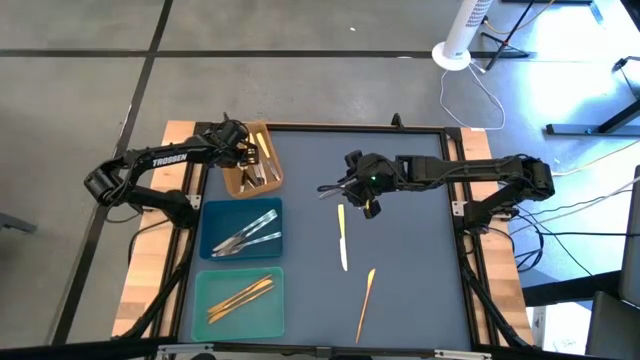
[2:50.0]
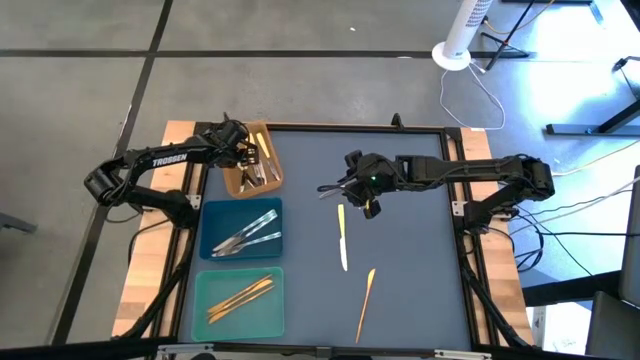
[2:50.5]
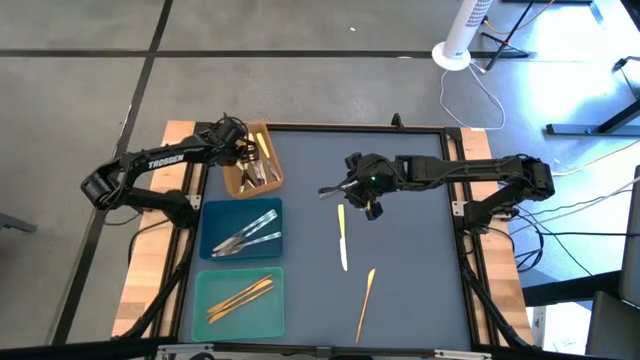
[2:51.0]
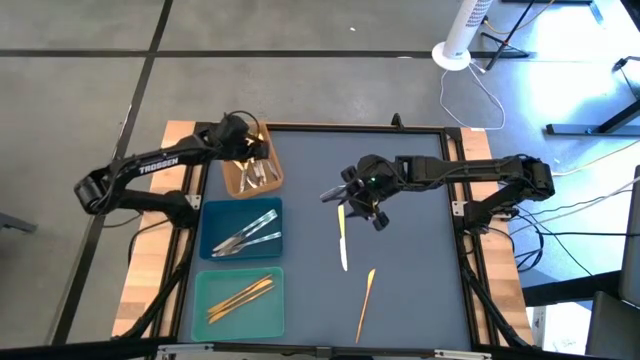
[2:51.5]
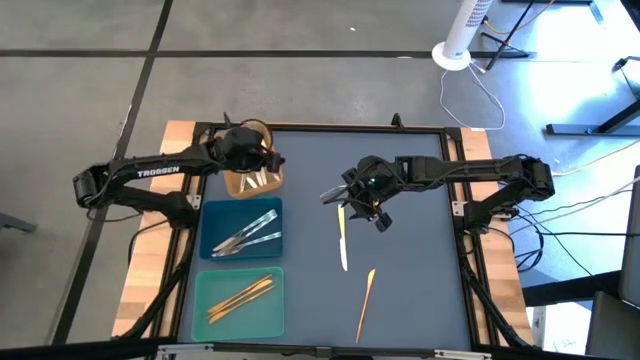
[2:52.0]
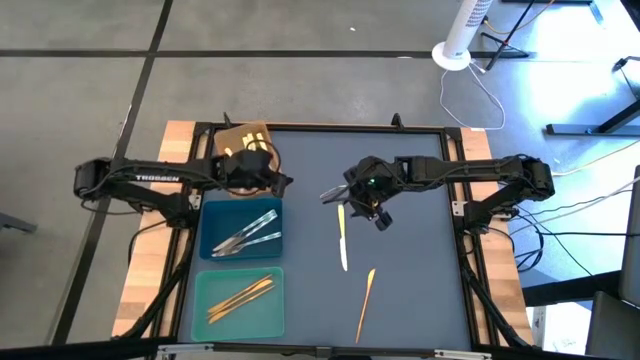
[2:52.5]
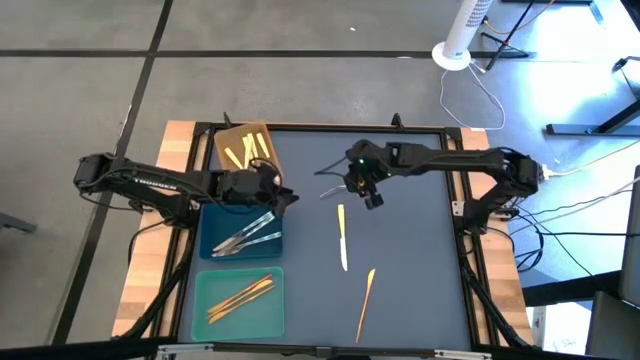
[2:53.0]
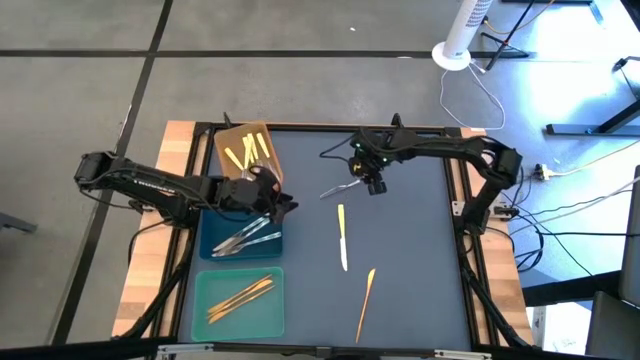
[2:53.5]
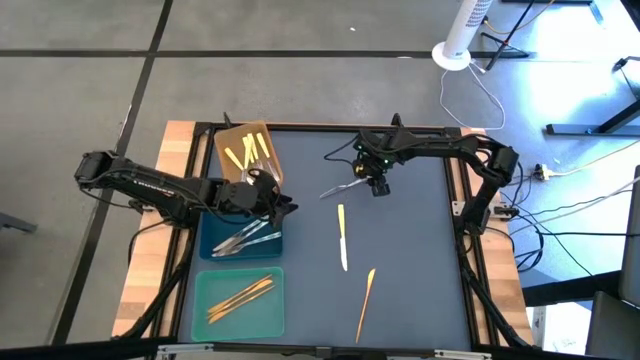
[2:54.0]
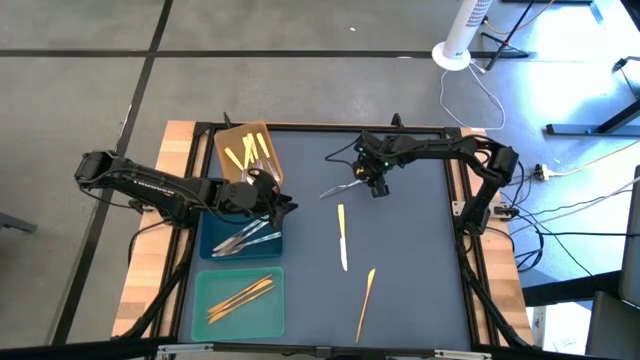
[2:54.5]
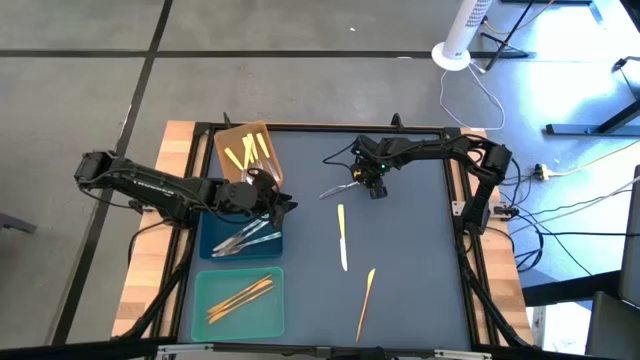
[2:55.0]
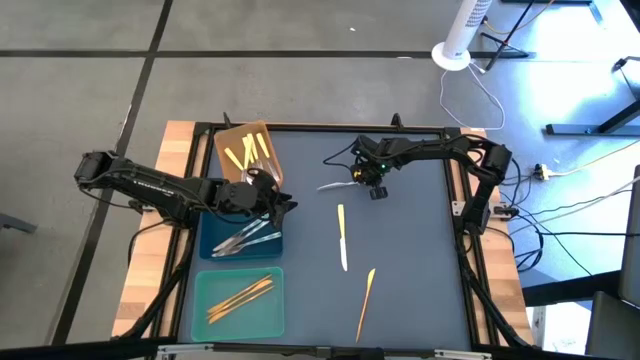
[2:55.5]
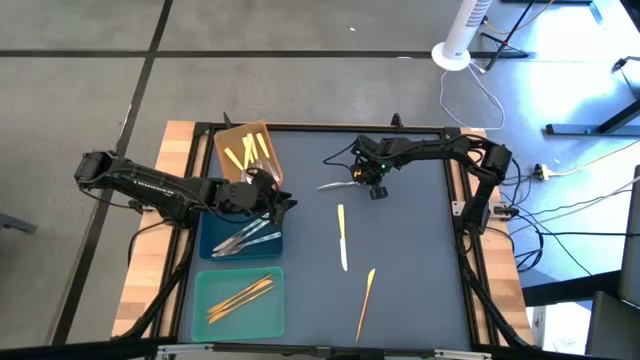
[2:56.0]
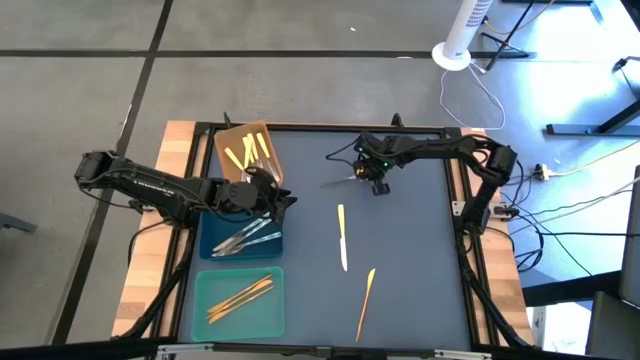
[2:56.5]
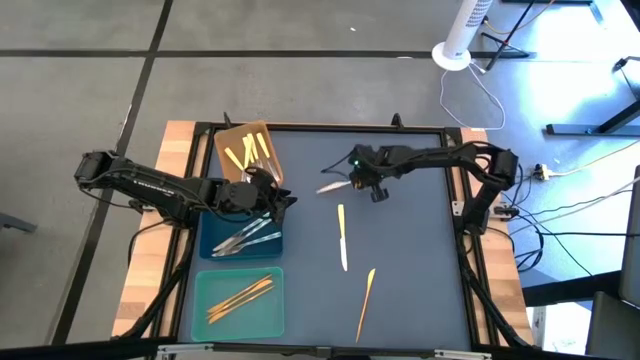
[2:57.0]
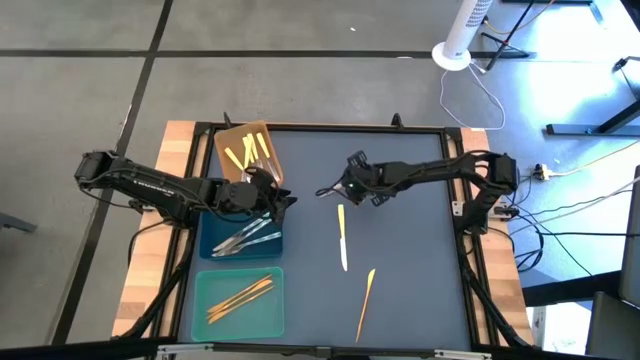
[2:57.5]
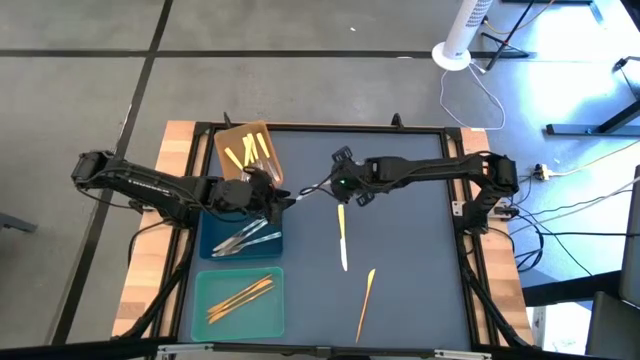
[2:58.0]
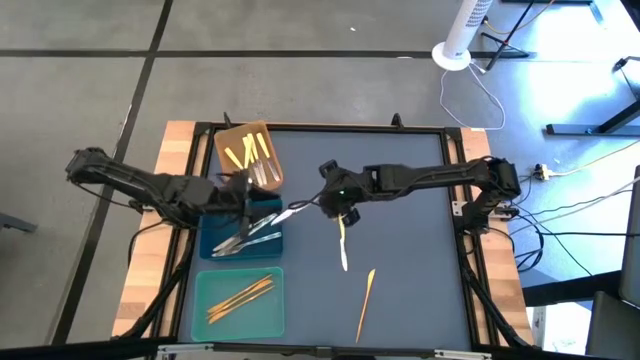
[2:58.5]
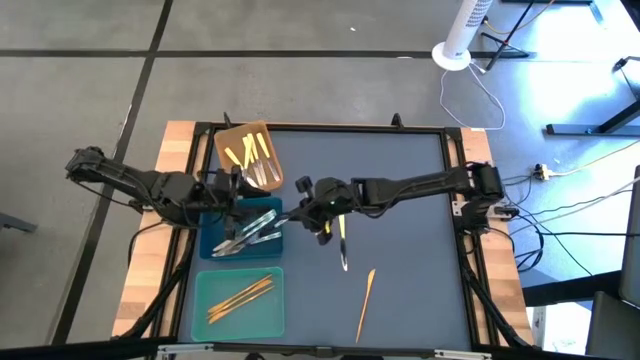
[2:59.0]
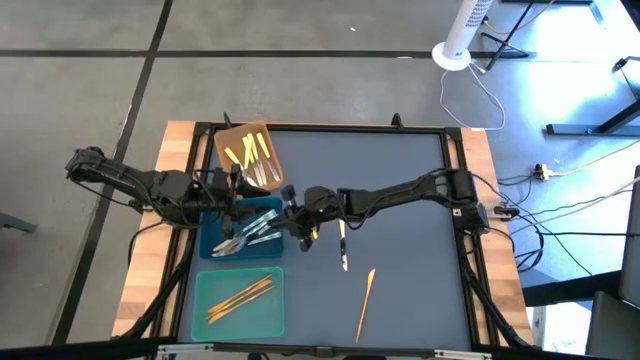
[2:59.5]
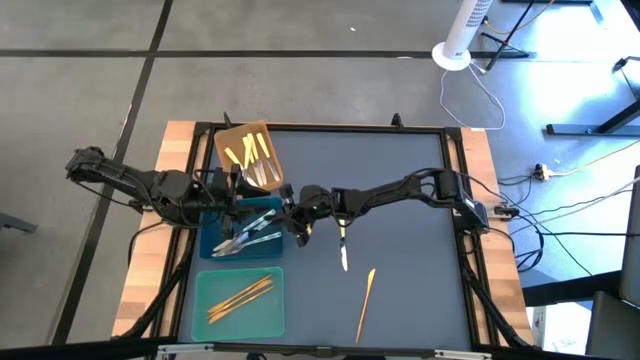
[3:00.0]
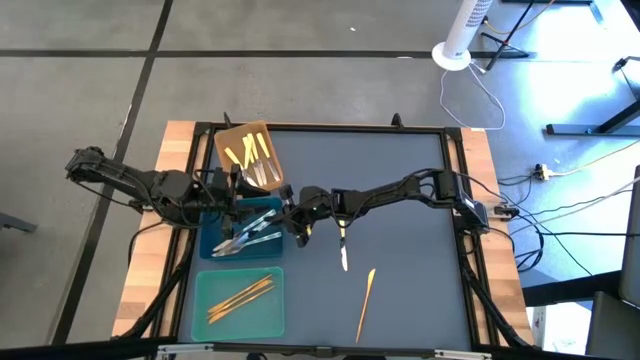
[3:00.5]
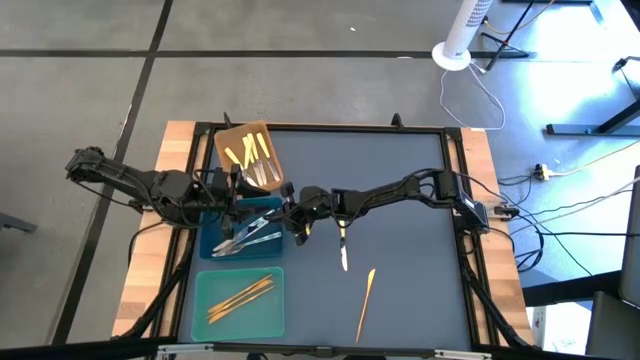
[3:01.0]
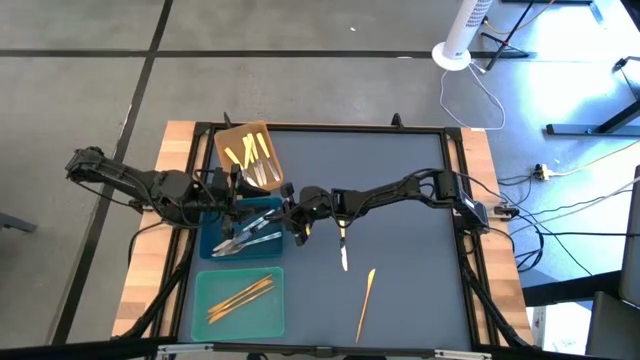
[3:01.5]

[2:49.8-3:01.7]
Task: Sort silverware by color (type)
Put the white-green knife into the blue bin

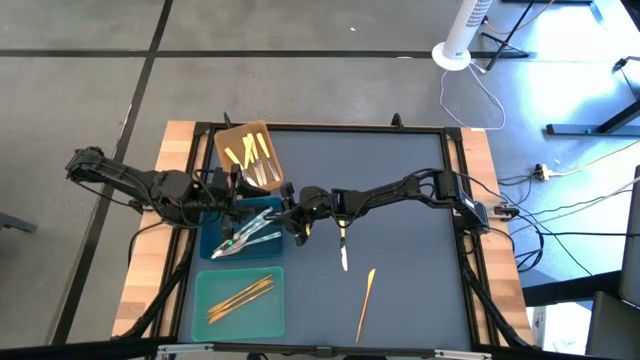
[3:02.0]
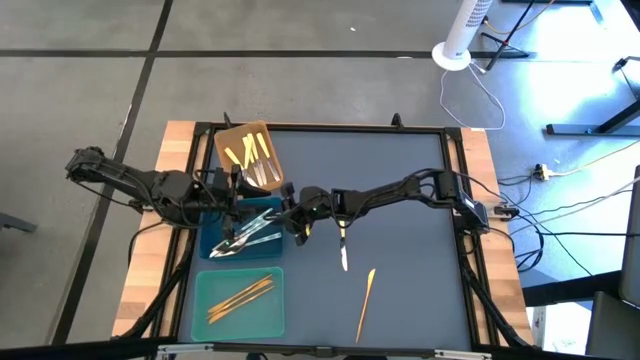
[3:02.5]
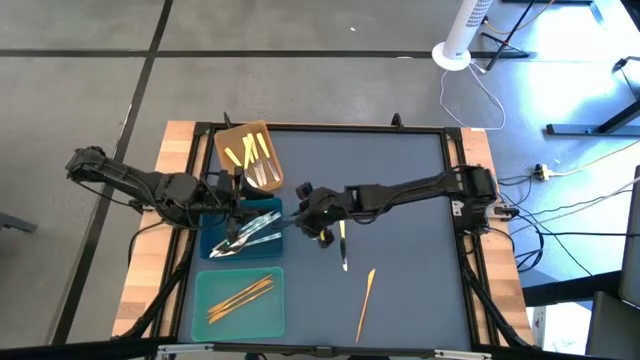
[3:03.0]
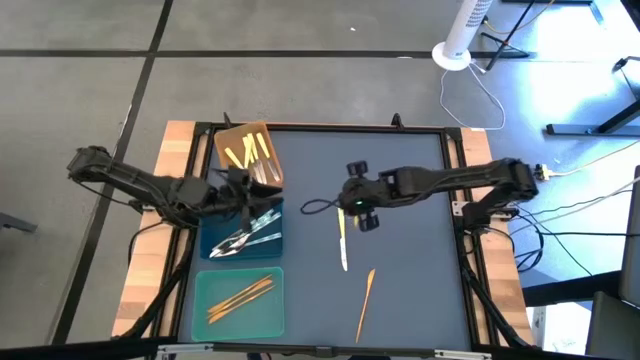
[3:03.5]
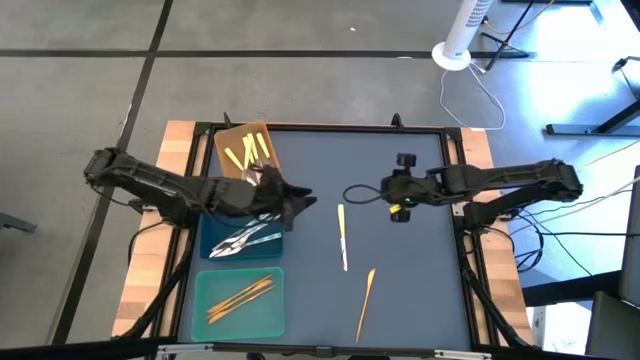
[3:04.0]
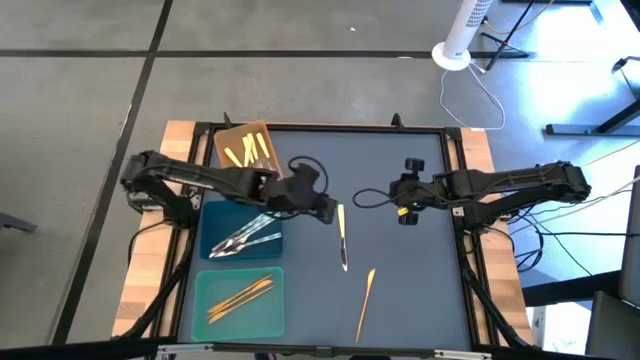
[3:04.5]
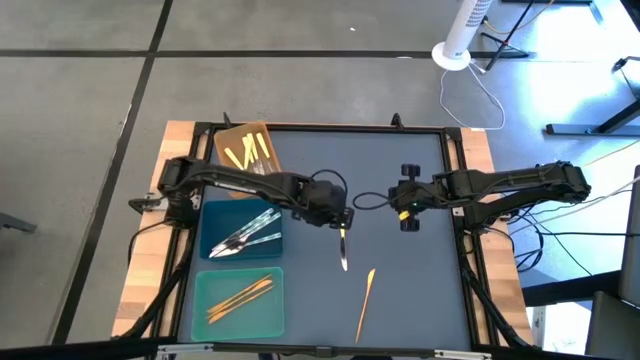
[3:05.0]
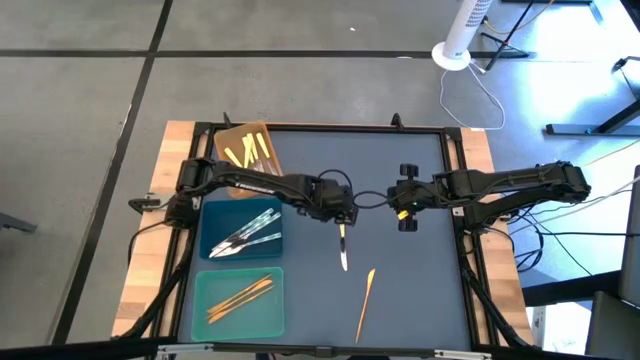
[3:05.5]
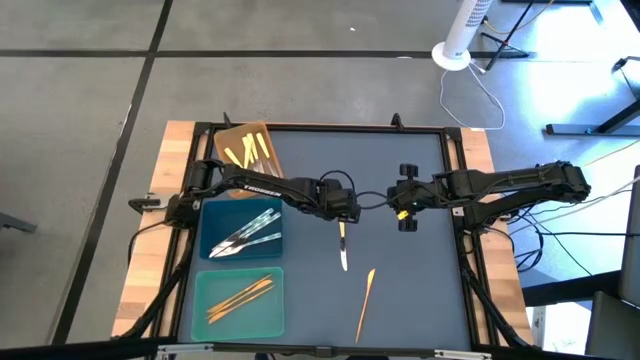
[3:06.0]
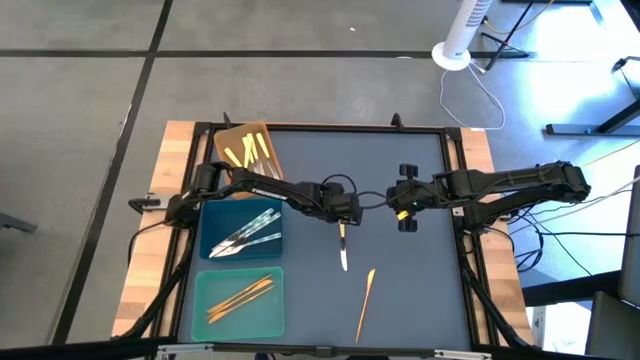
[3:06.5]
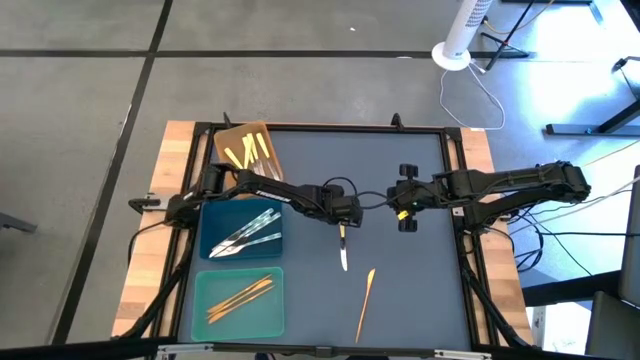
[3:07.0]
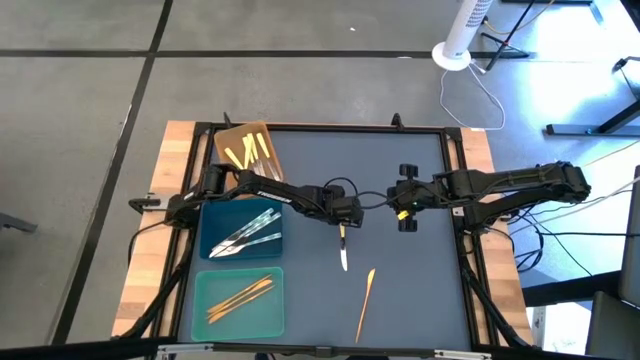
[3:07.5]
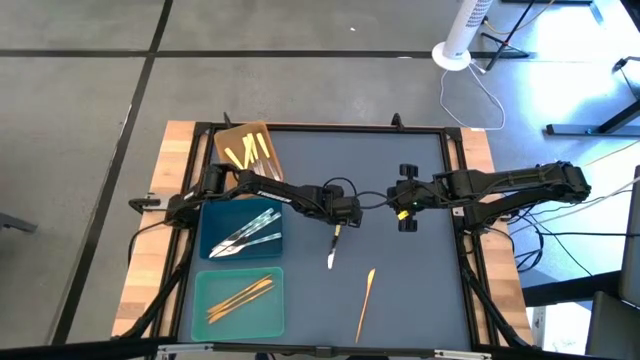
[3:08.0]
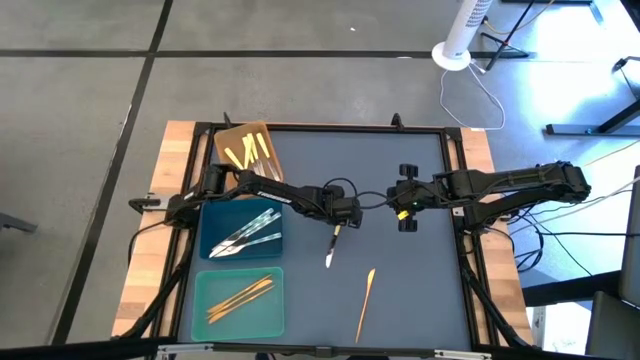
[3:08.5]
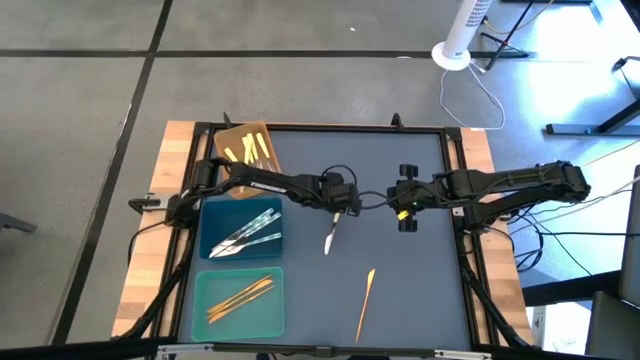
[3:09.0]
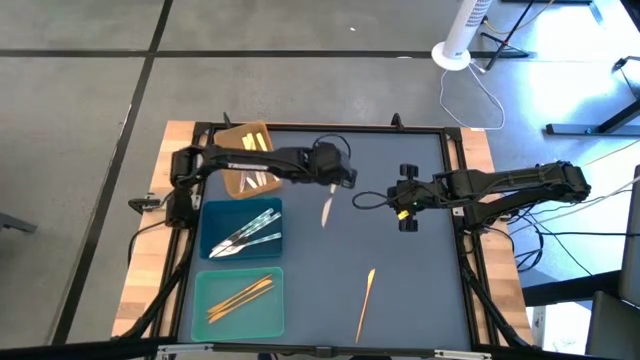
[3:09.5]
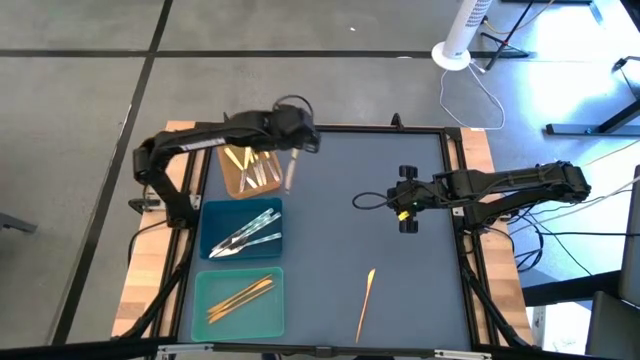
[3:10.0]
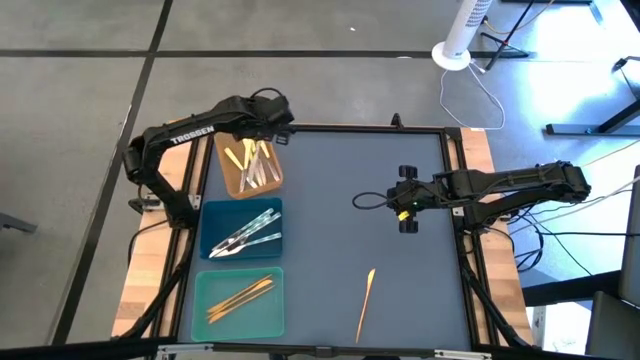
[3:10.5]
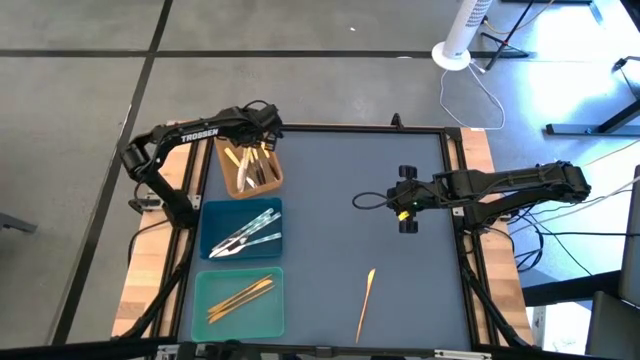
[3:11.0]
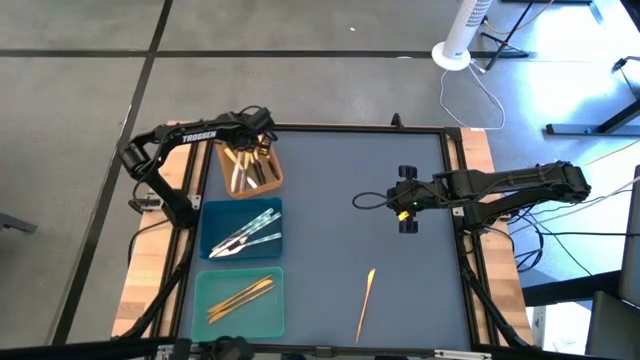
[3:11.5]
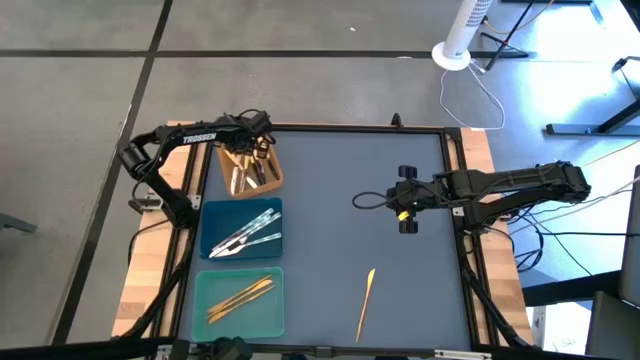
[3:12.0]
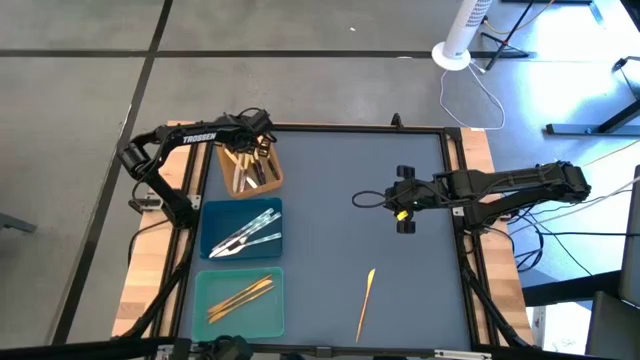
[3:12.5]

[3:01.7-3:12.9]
Put the yellow knife into the orange bin
